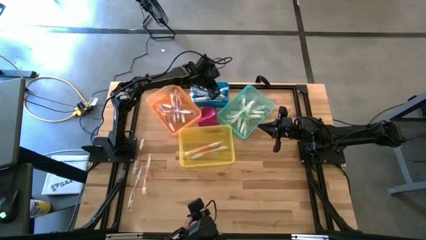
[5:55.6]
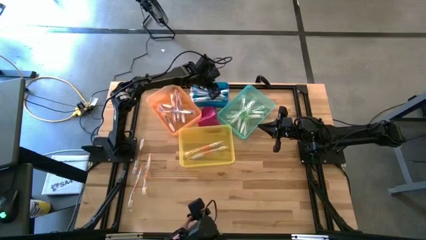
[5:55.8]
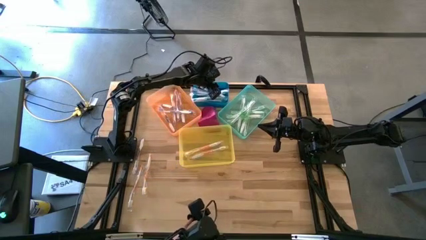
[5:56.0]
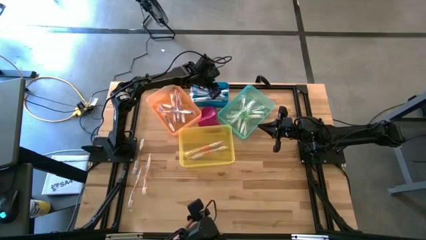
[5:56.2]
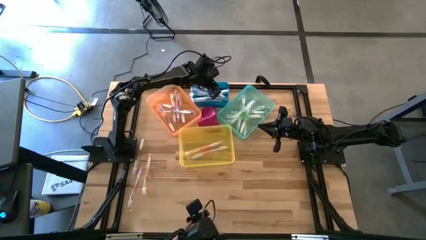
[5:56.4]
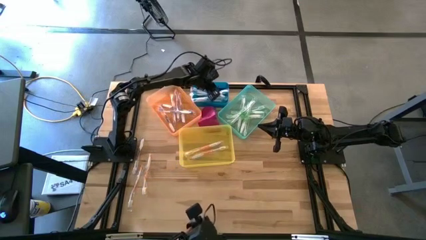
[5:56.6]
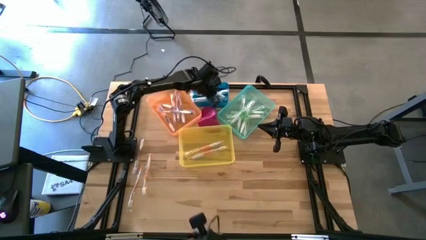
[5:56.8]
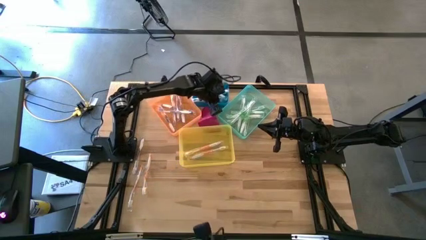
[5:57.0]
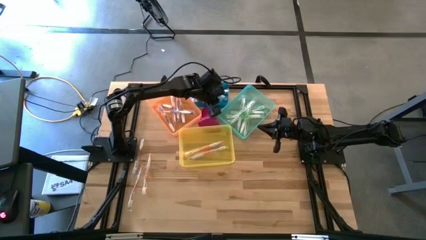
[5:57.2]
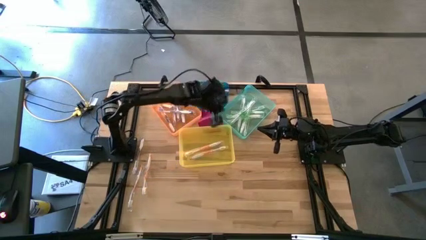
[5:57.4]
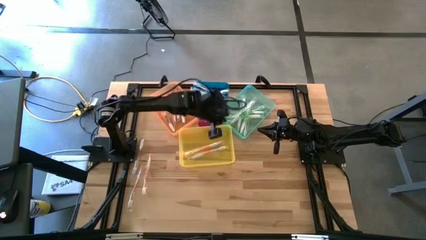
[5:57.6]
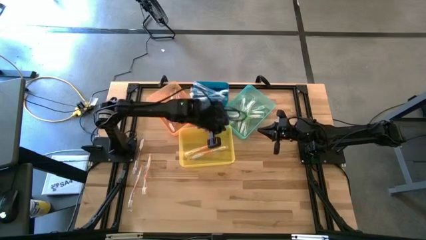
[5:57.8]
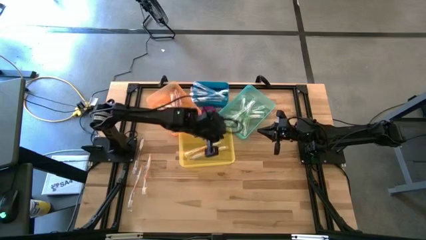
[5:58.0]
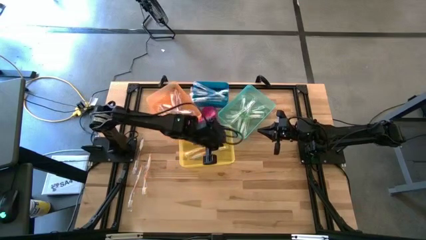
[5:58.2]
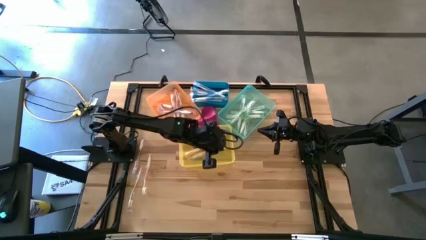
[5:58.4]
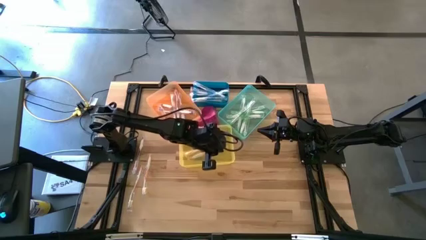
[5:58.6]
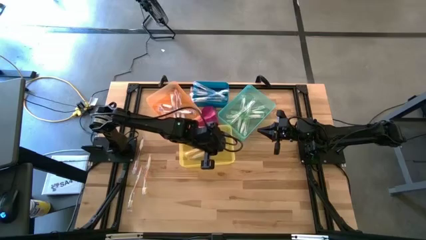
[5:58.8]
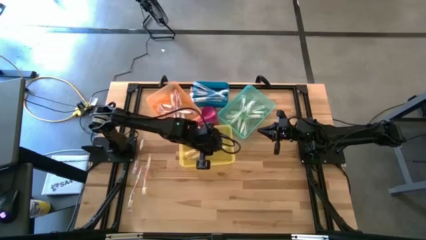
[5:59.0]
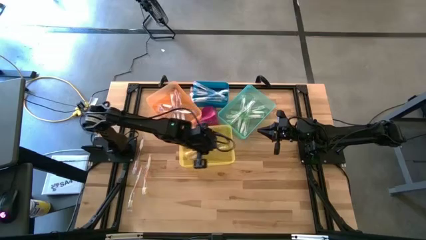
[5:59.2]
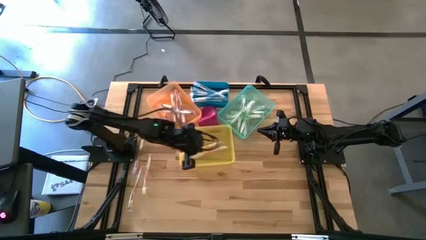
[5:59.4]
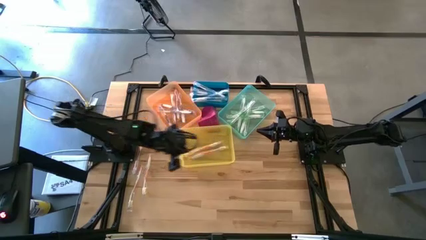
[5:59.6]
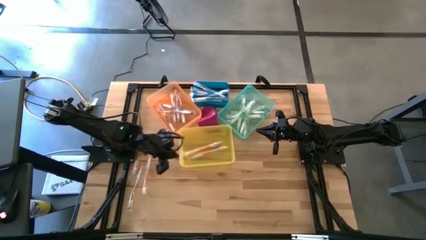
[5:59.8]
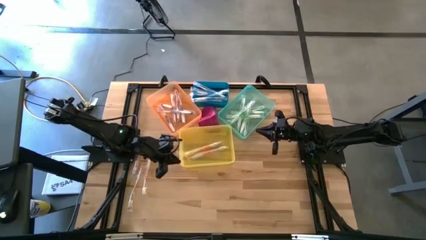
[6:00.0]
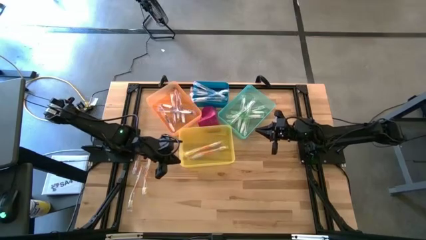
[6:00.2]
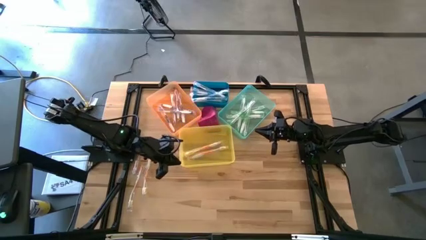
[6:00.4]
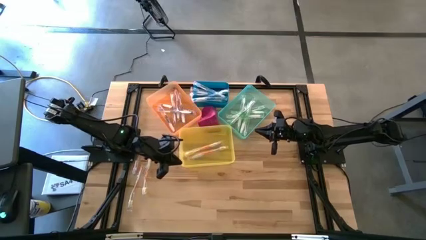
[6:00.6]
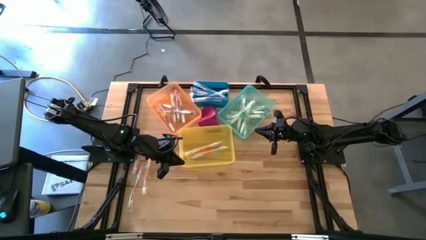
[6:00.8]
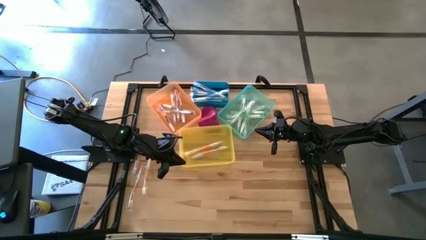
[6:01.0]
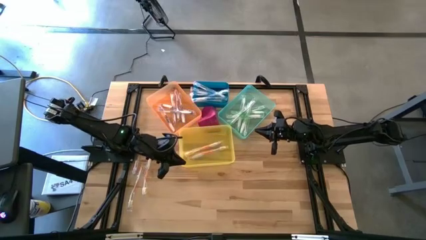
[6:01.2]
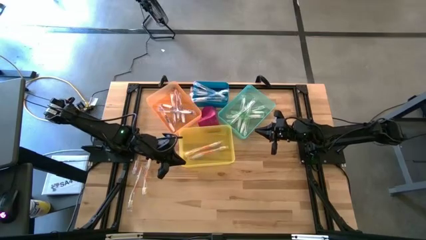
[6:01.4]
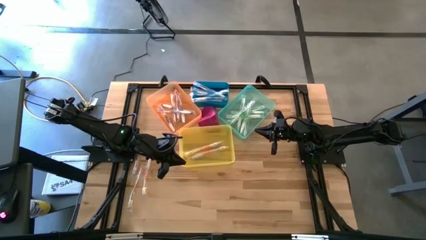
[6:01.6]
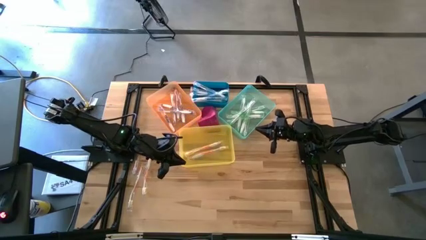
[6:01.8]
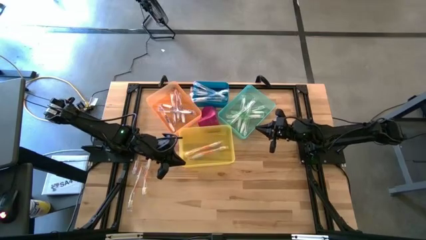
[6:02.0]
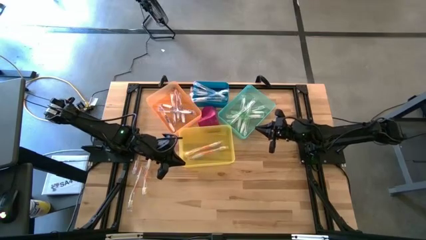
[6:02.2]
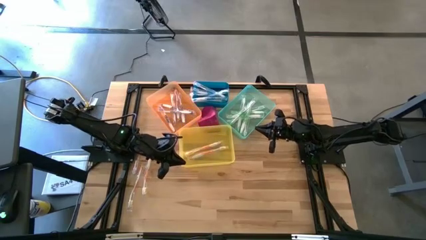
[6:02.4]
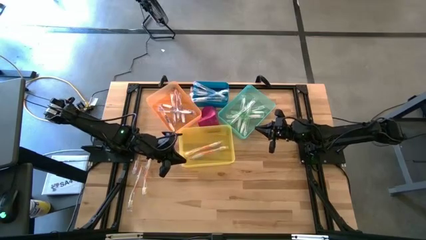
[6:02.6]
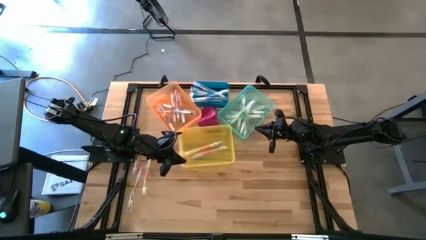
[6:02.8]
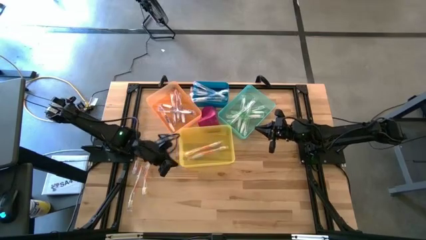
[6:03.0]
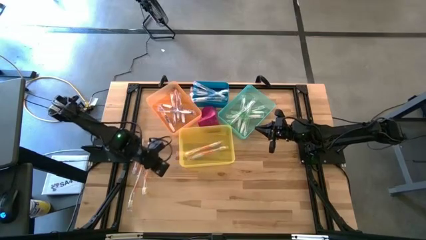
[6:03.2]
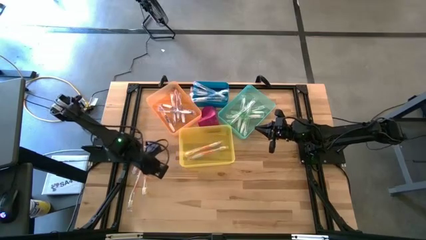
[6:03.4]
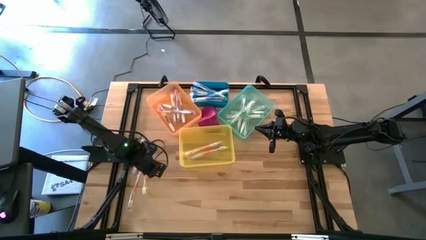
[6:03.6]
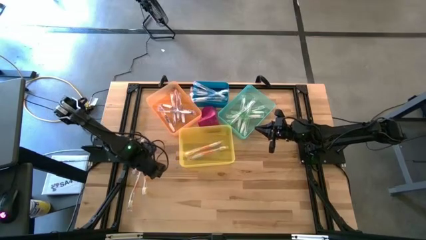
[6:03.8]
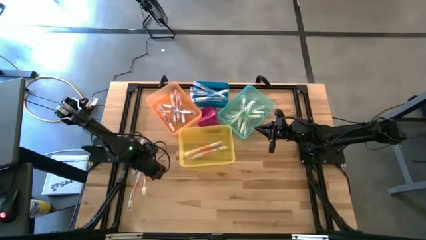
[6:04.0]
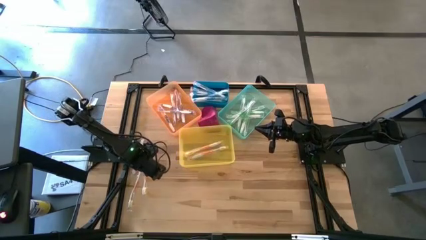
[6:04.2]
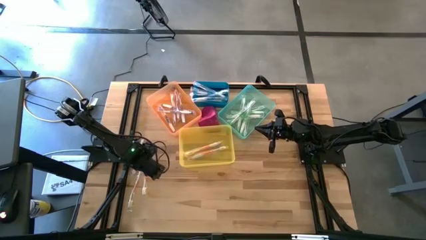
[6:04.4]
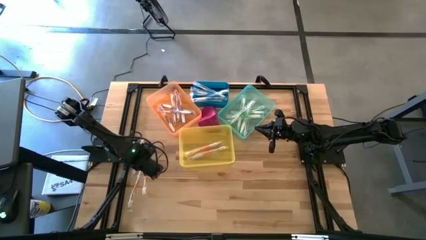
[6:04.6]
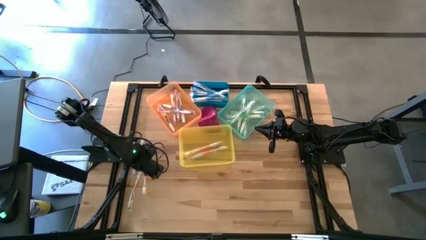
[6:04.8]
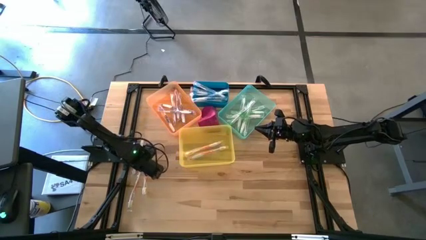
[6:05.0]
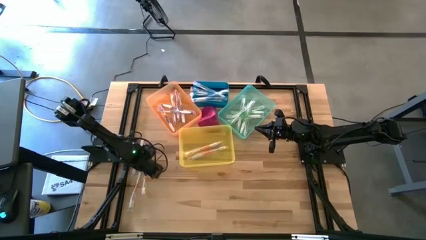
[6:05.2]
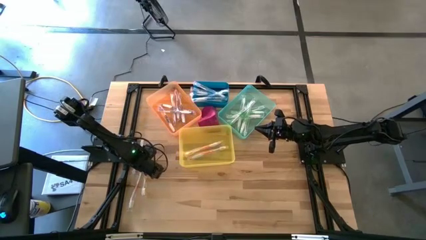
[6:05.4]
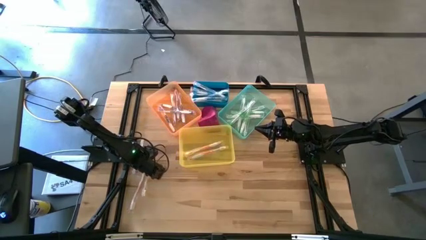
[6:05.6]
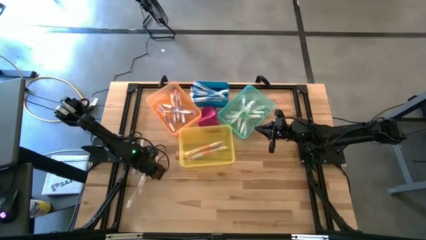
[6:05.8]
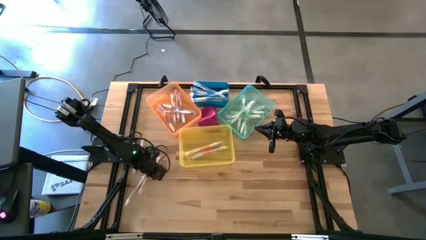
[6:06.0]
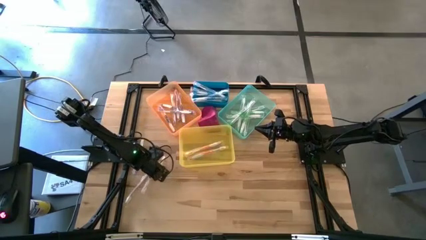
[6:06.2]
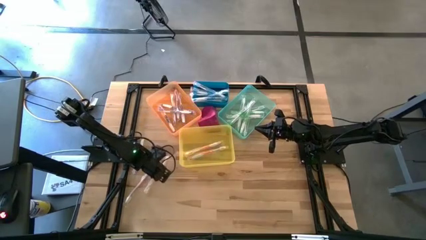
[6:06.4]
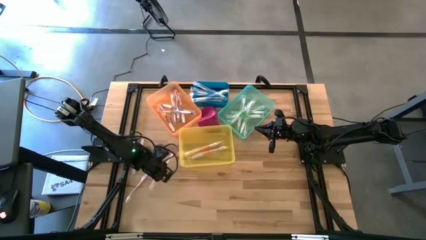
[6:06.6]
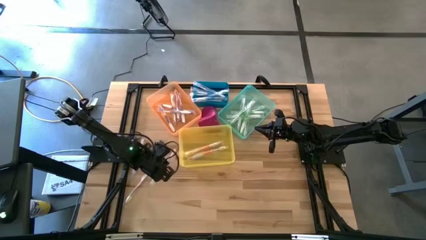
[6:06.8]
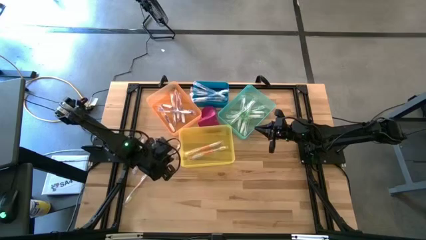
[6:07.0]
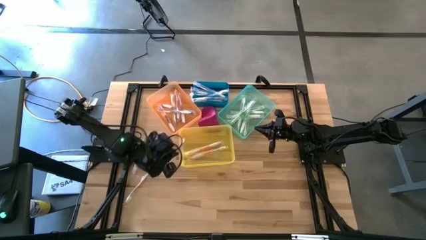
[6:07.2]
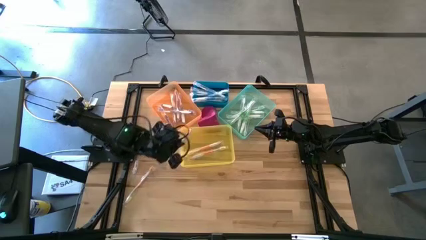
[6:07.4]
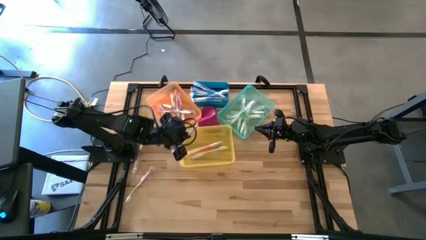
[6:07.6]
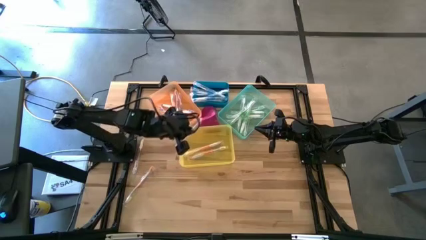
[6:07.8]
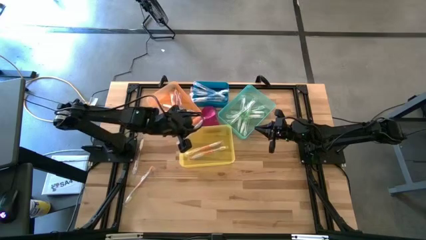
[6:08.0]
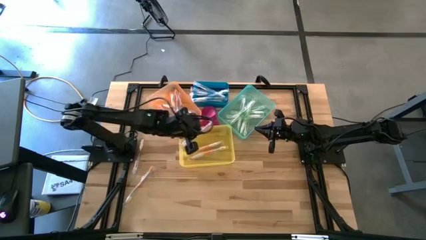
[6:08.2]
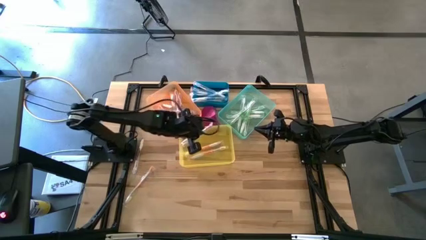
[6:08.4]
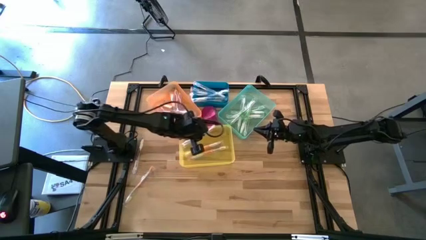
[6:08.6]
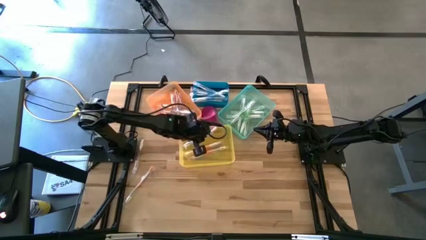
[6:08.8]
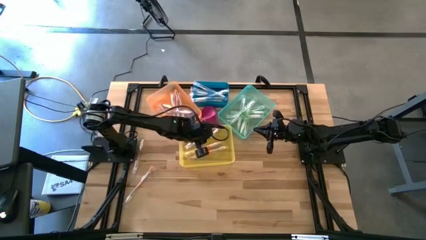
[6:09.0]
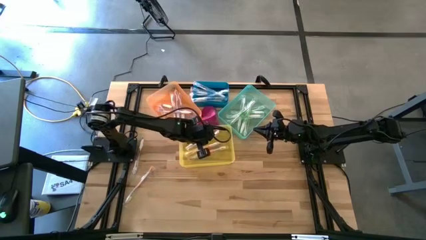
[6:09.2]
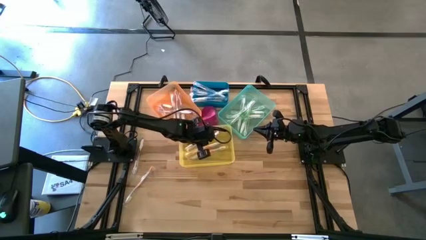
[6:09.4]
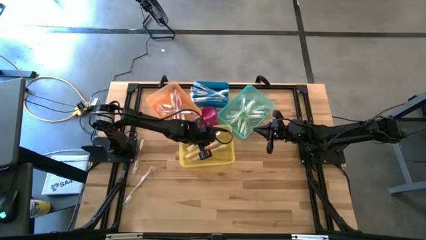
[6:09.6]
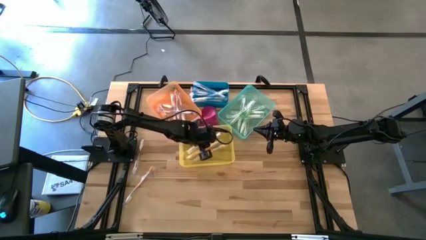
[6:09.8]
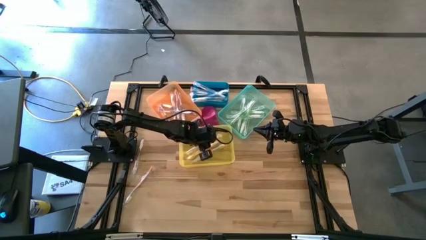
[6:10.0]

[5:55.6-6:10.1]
Task: Pick & Place Toothbrushes
Put the orange toothbrush into the yellow bin
